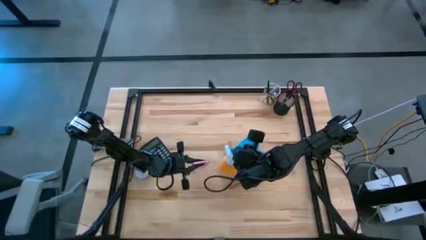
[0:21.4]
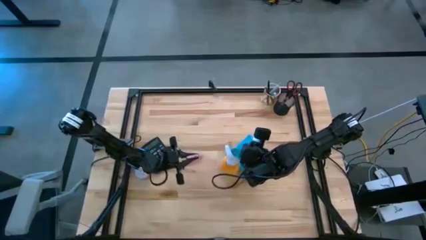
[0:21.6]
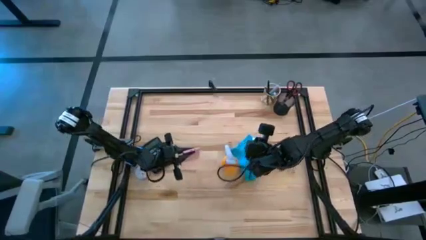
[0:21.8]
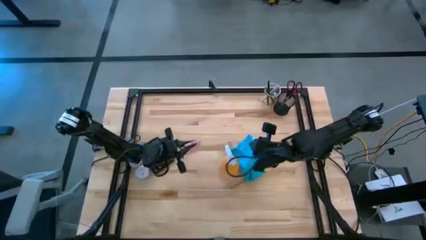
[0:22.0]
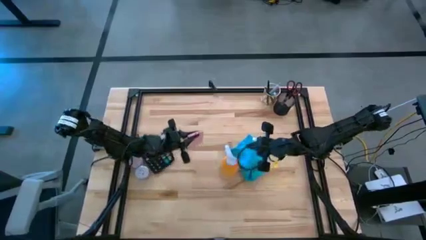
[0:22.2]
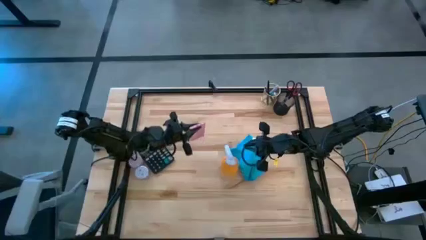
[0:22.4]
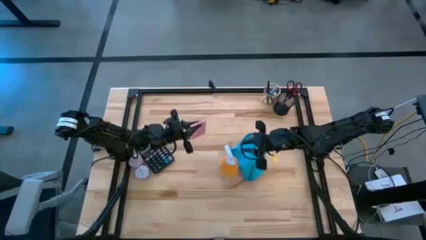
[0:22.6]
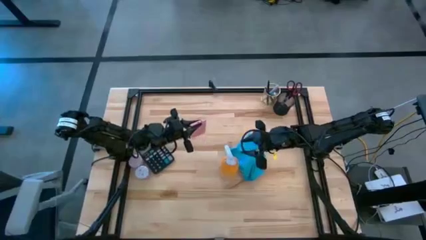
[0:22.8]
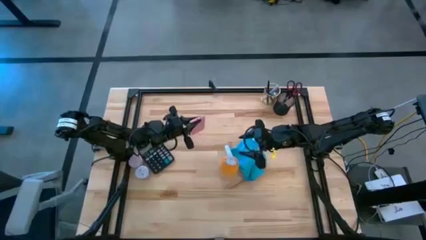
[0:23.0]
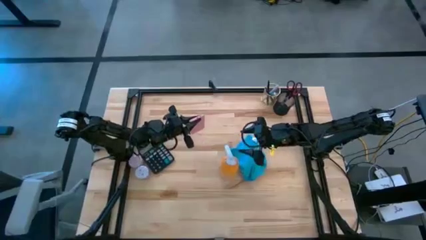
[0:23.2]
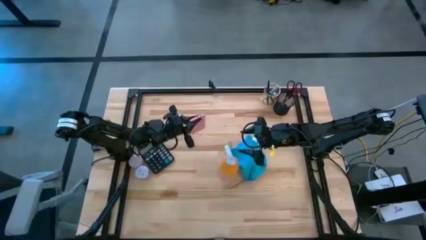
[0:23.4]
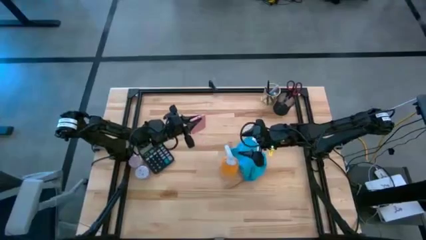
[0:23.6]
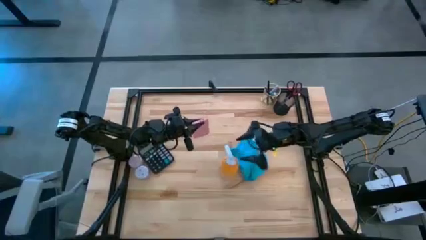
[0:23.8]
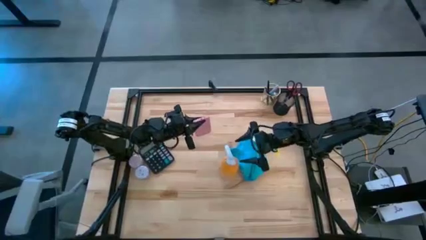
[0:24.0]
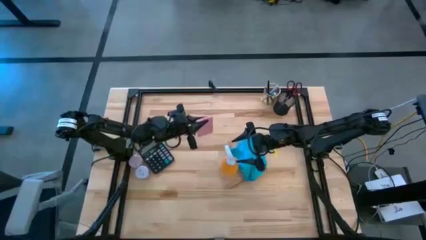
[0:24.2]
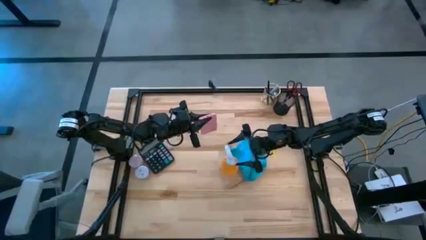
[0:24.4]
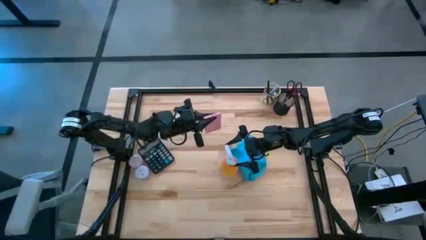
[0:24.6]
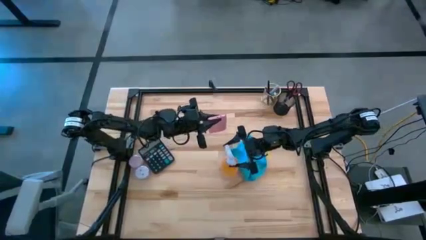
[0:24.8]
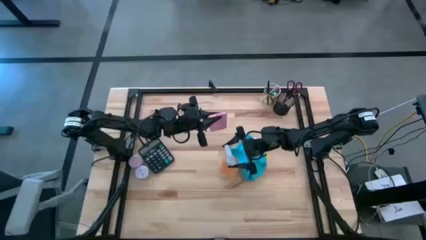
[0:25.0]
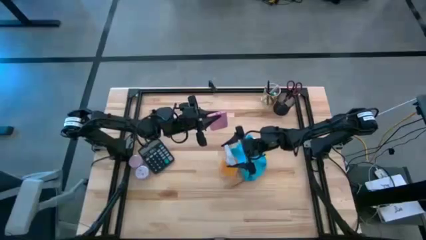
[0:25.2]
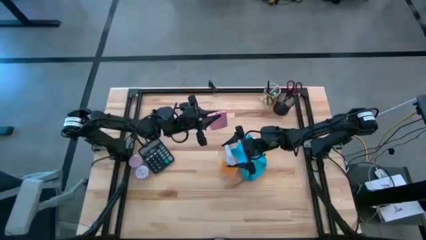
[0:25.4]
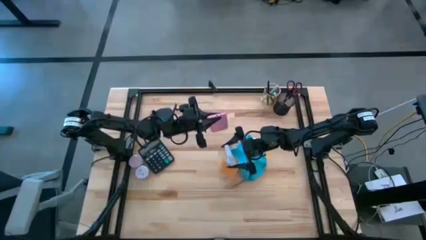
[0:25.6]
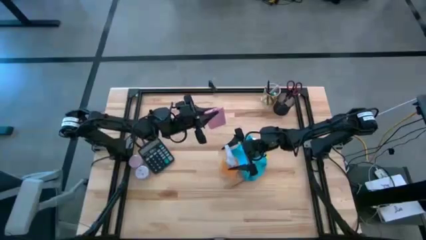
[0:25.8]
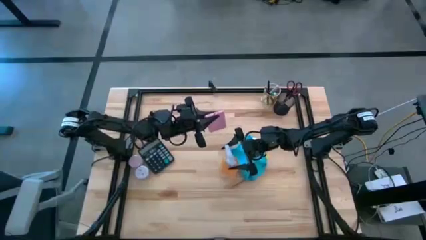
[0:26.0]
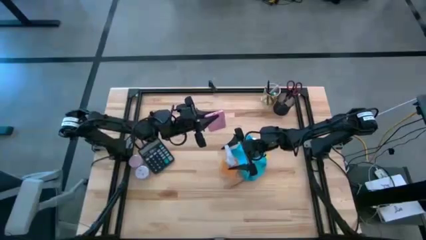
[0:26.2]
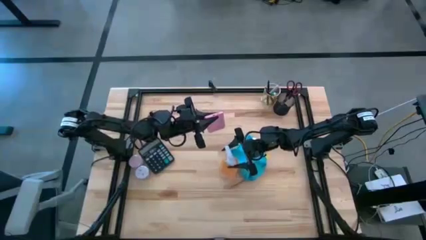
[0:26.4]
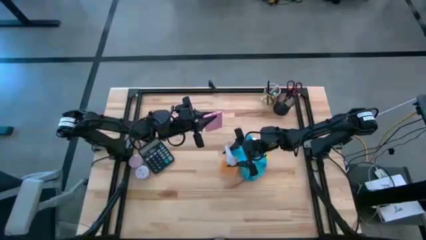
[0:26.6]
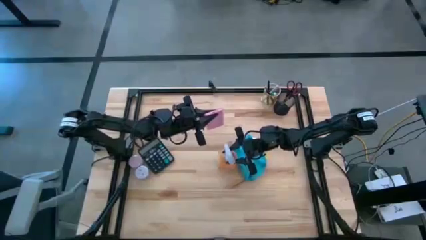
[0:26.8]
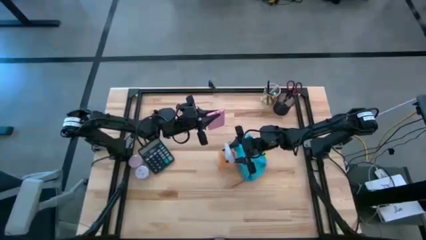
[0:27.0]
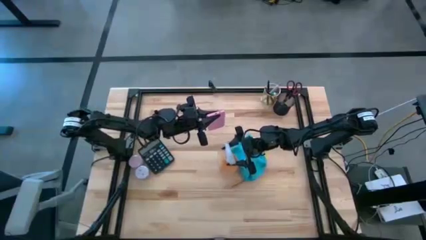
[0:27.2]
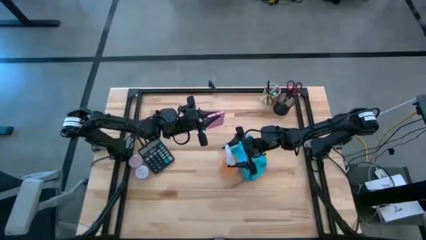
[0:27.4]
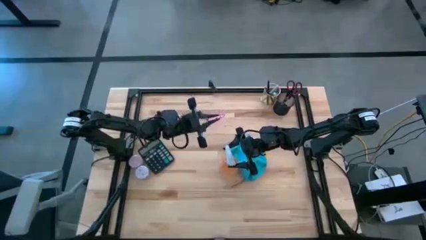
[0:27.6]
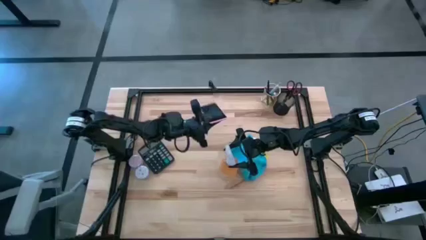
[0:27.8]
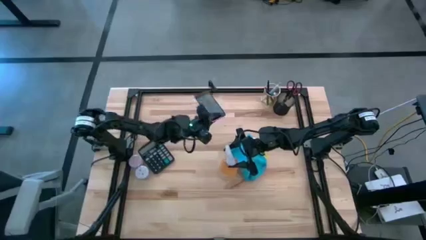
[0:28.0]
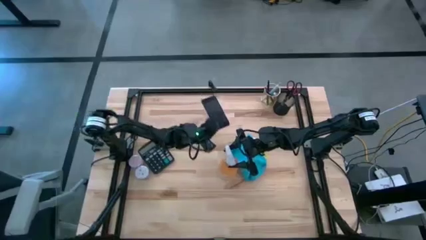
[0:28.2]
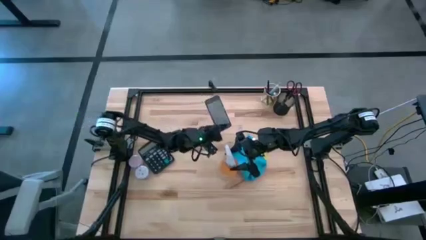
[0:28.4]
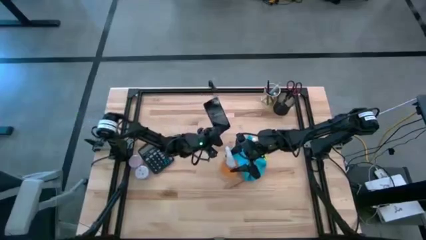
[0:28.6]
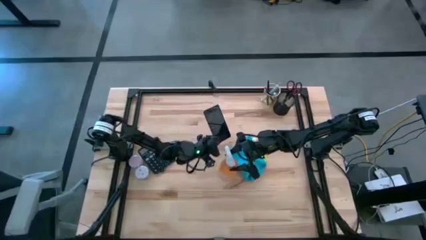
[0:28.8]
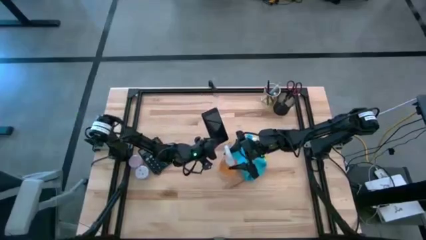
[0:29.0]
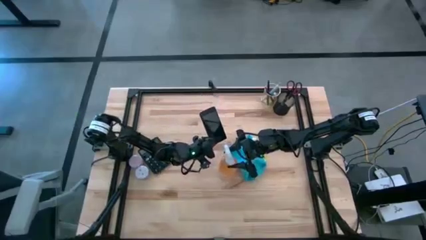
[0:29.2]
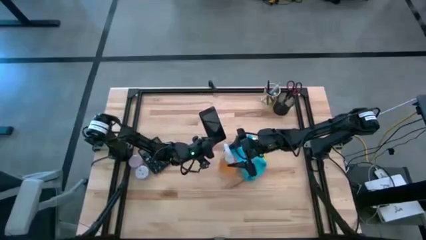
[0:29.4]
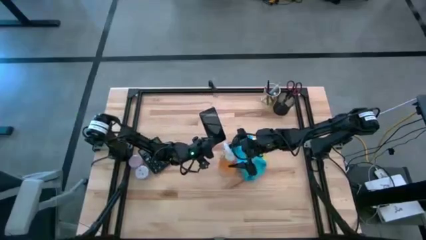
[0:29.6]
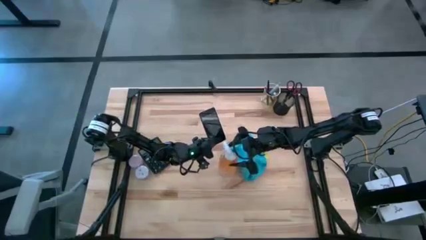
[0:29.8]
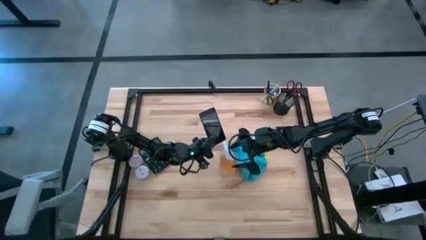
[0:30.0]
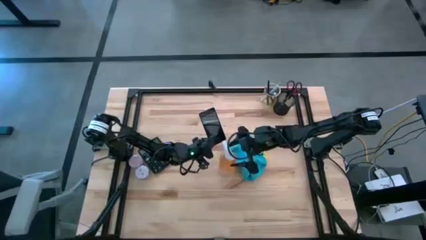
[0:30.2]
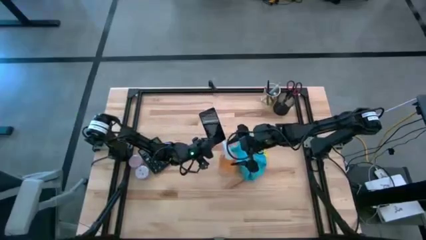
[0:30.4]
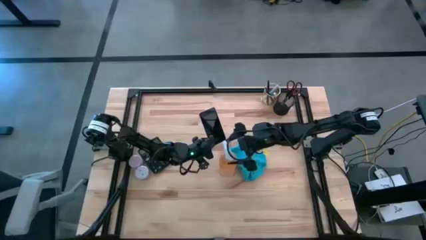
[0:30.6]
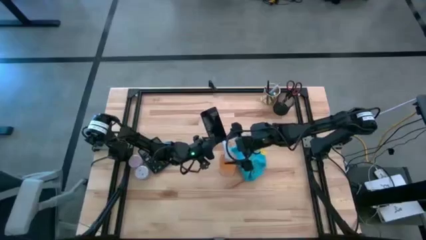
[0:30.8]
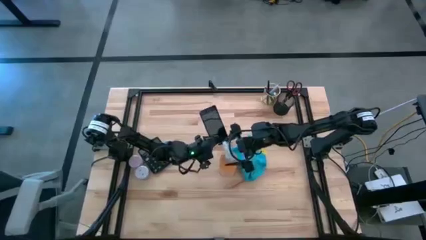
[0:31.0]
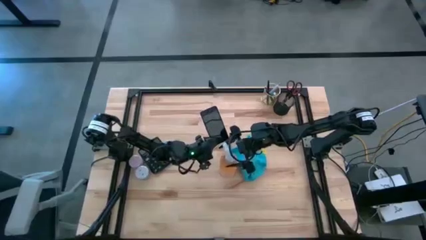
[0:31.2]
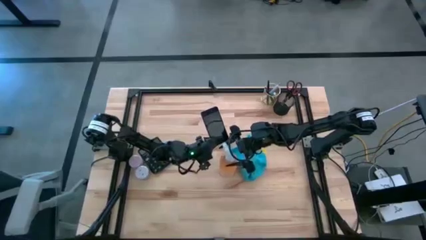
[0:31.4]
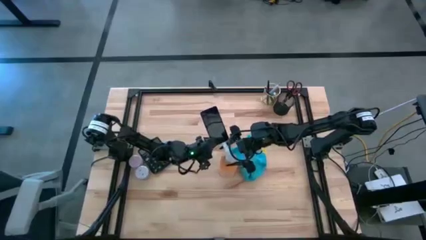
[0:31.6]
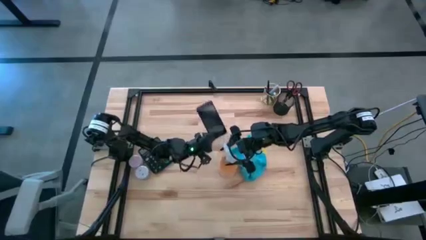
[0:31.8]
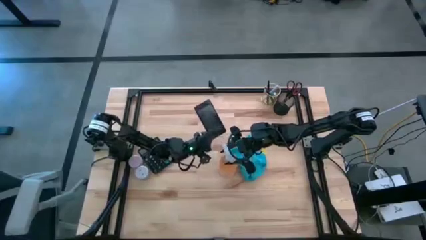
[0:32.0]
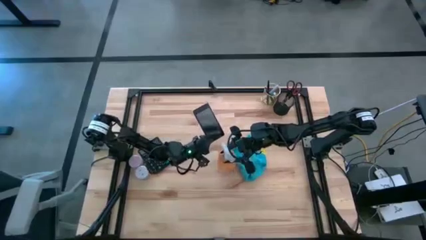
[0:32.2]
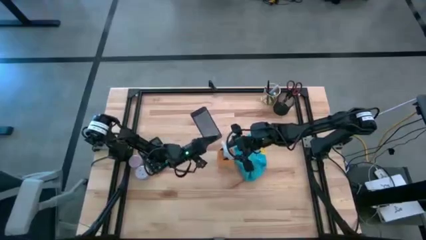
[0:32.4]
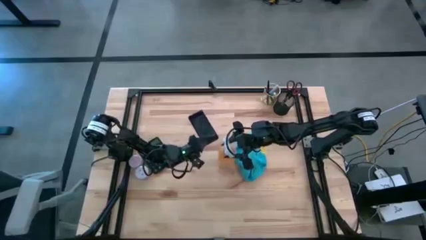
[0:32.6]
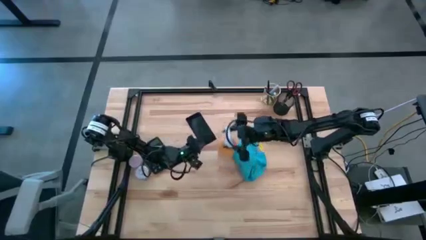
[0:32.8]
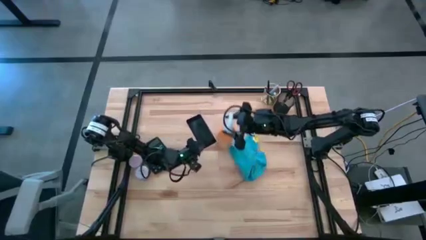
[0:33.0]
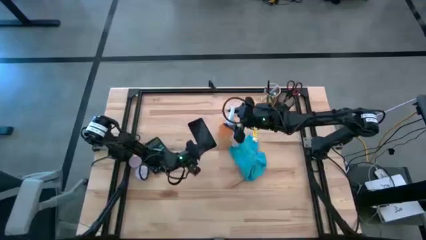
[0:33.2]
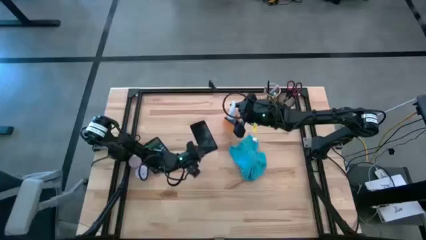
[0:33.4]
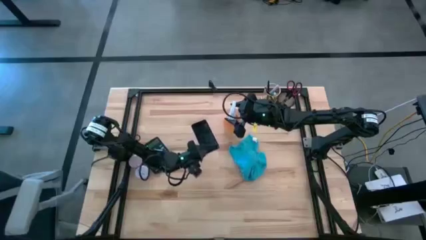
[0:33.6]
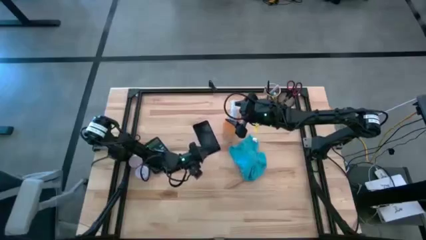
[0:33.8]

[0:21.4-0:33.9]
Task: Apply microfiber cloth
Spray the pink cellphone using the yellow spray bottle

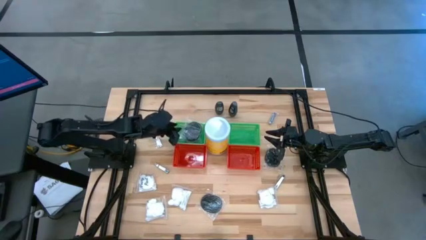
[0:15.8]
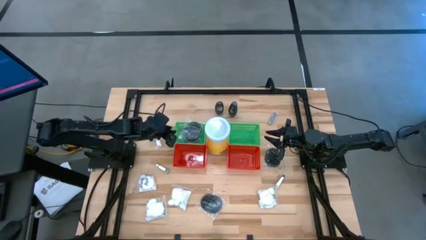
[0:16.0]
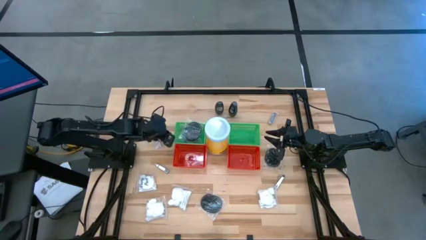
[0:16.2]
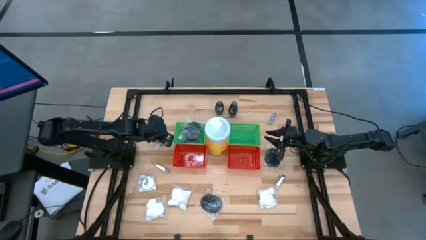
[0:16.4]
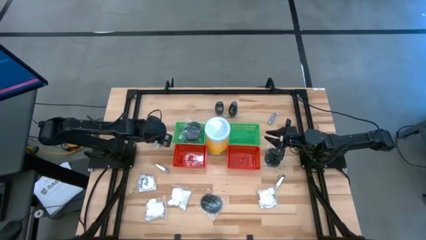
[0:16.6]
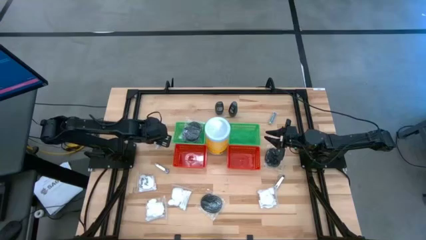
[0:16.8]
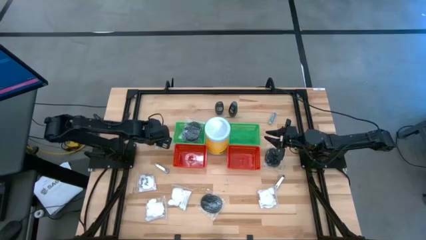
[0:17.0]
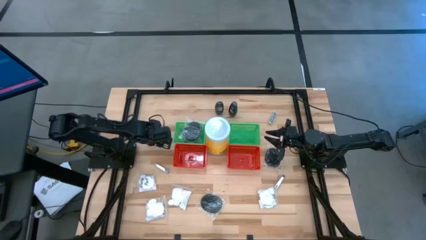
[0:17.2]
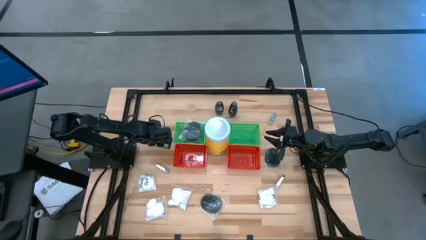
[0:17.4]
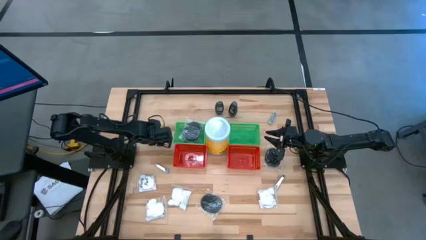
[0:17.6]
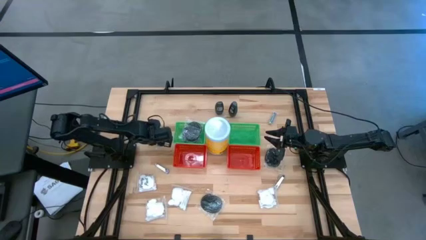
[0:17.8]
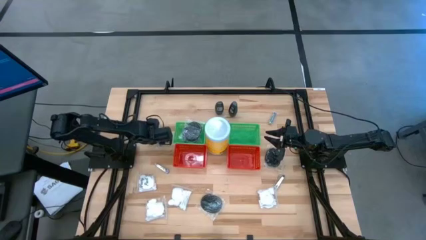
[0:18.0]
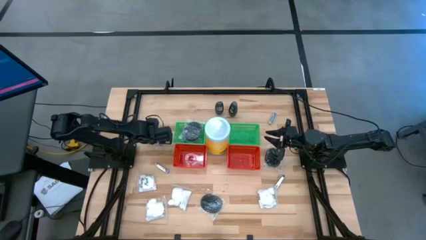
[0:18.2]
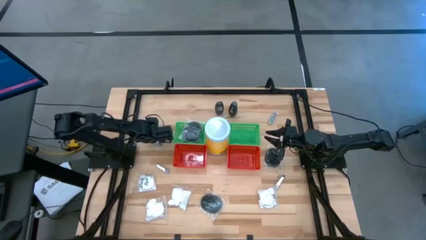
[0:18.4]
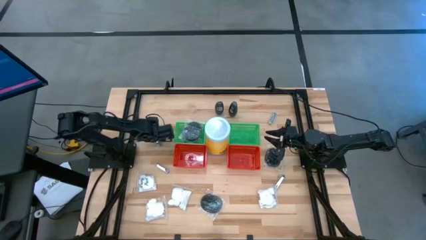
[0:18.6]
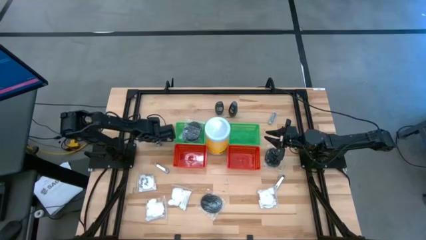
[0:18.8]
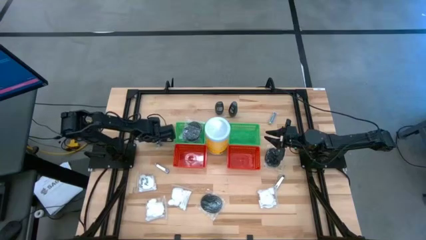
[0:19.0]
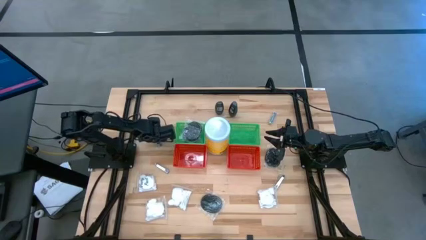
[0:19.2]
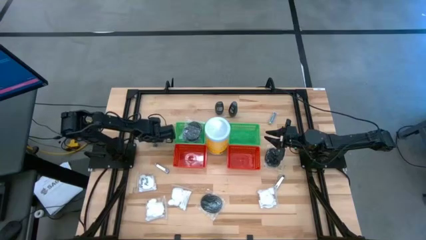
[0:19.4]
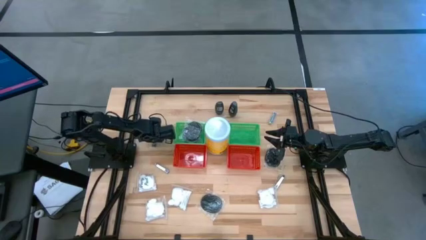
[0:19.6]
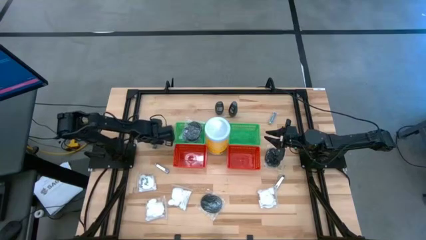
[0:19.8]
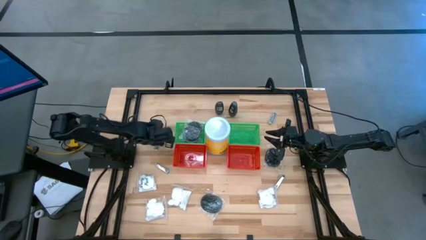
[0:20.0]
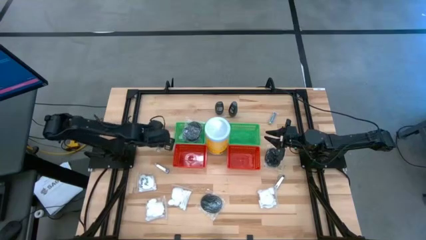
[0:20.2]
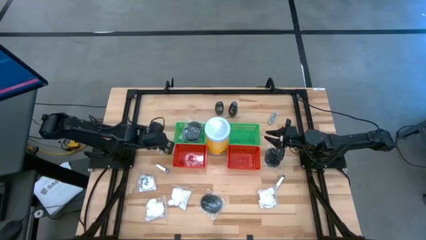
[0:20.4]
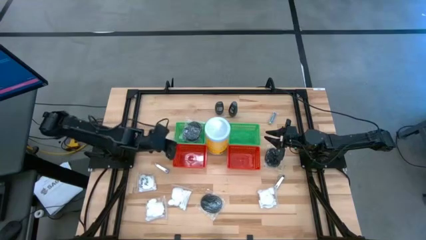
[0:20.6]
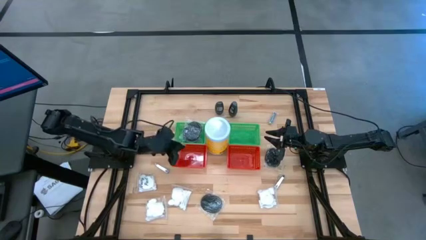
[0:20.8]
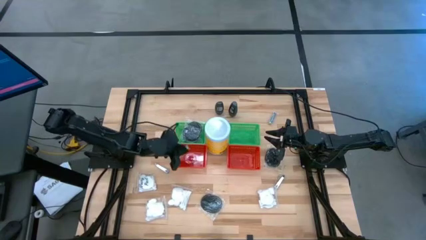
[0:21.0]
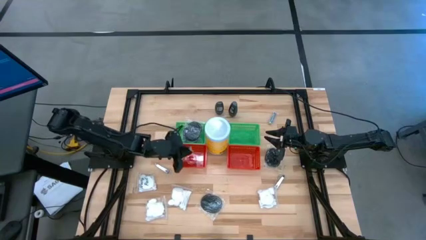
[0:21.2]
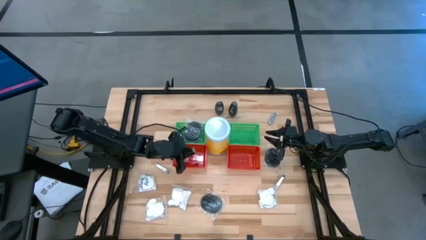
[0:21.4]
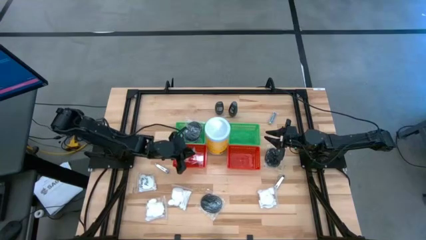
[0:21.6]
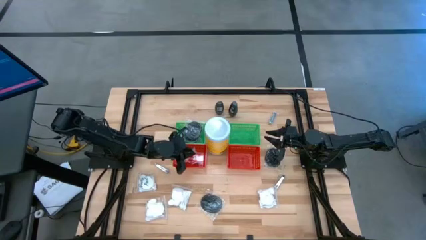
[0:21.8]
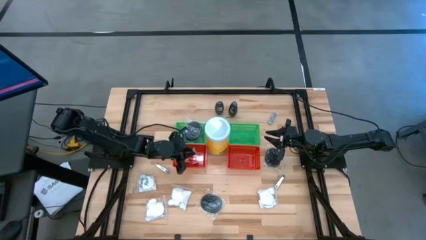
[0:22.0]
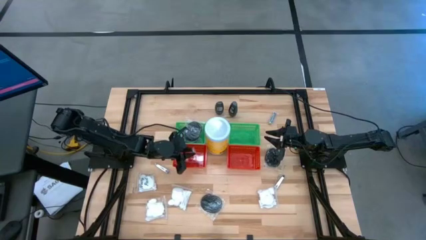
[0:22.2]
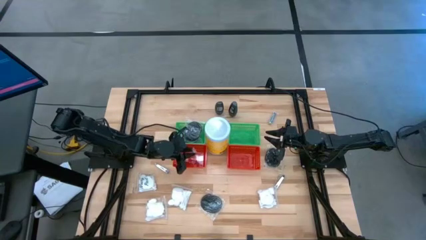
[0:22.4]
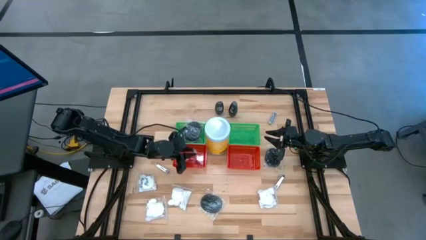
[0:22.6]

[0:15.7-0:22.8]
Task: Pick & Place Travel size toiletries
Put the nail cutter into the left red basket
